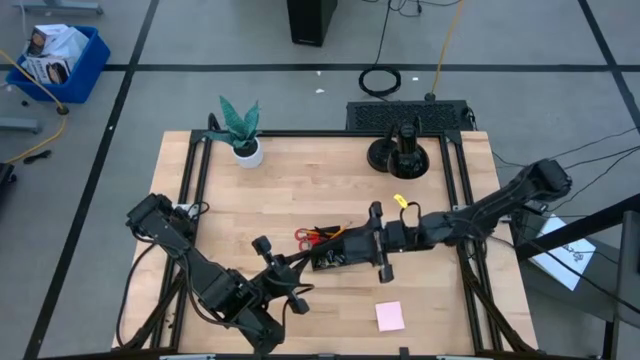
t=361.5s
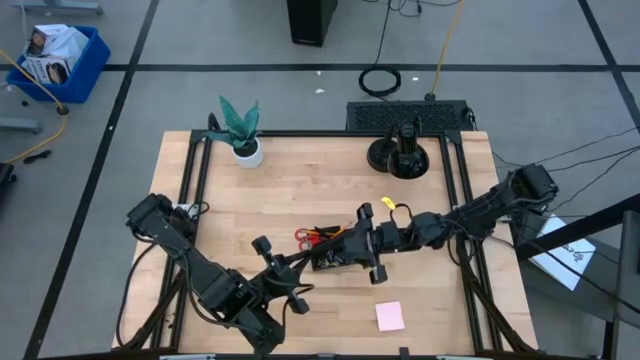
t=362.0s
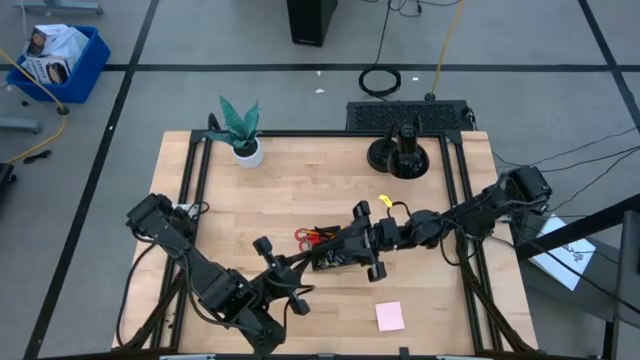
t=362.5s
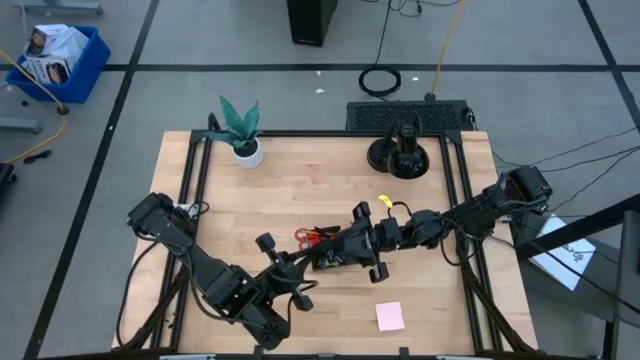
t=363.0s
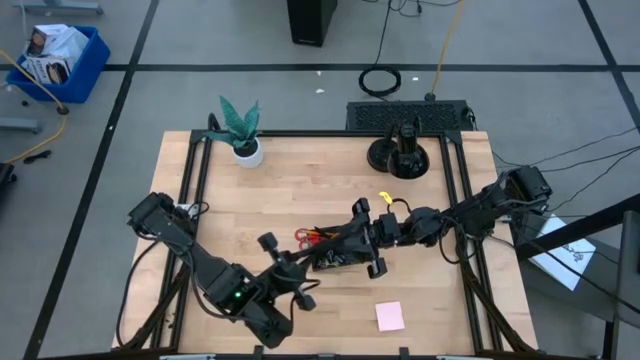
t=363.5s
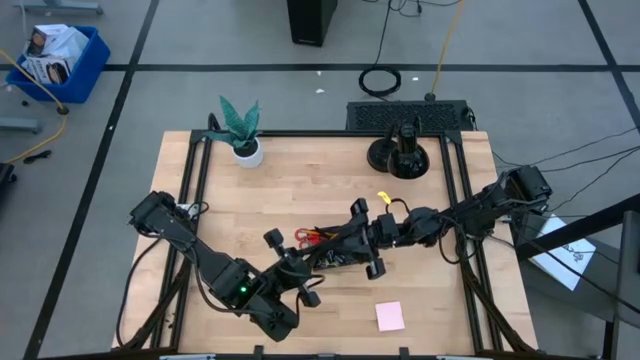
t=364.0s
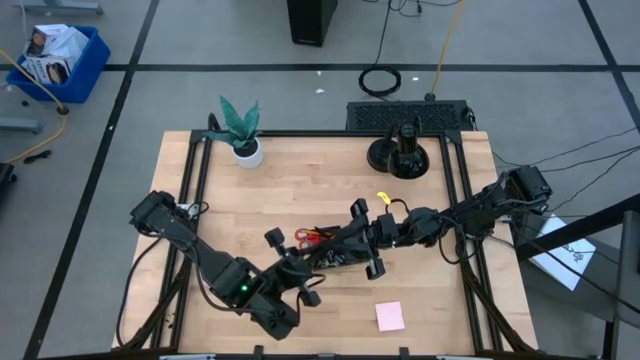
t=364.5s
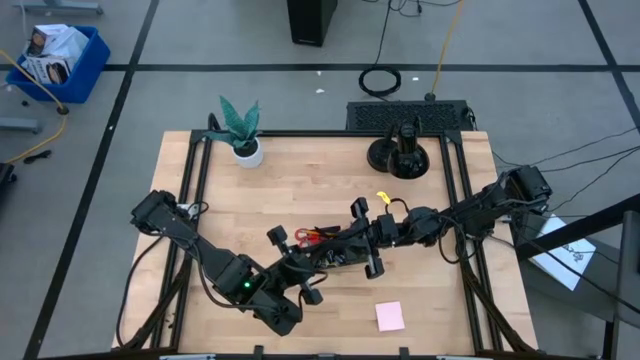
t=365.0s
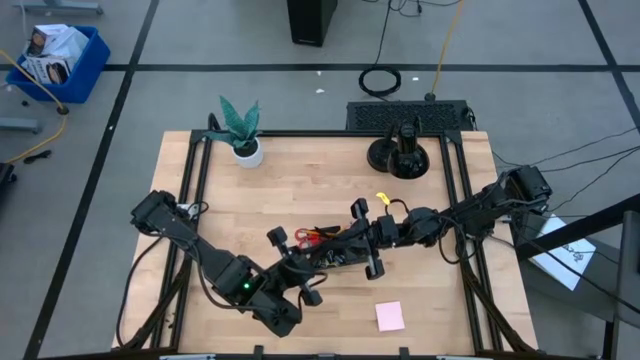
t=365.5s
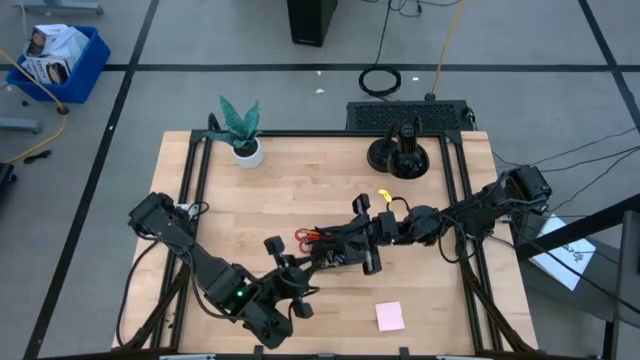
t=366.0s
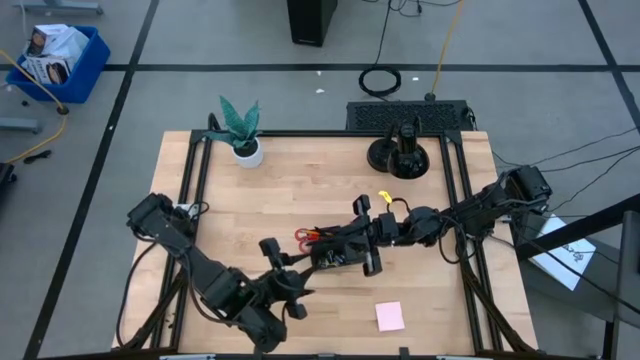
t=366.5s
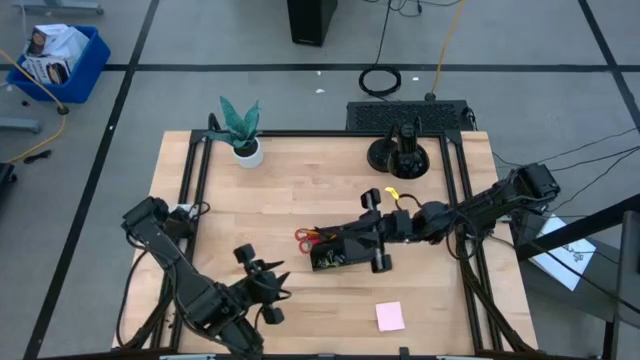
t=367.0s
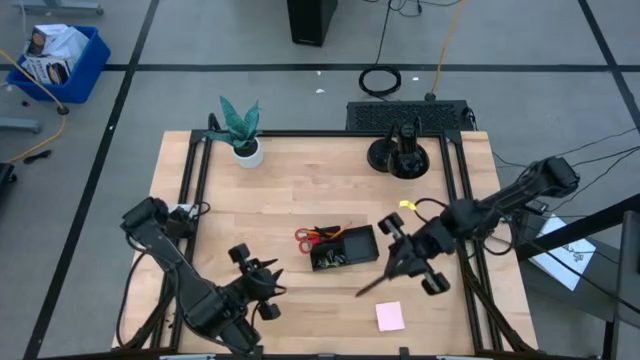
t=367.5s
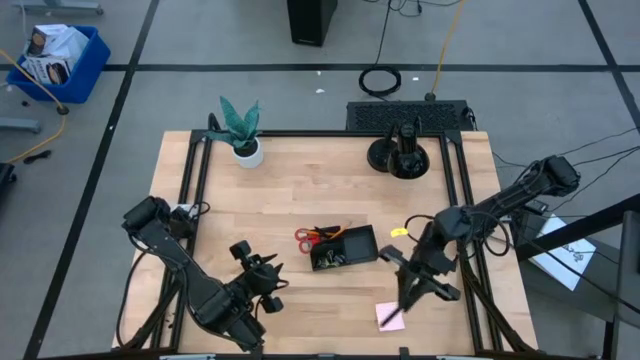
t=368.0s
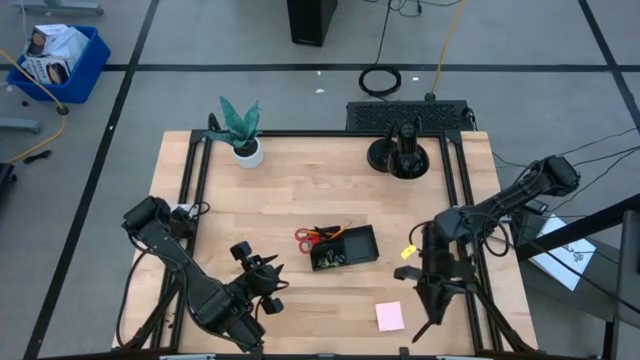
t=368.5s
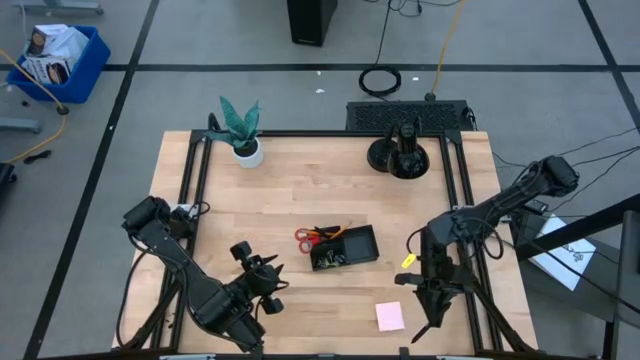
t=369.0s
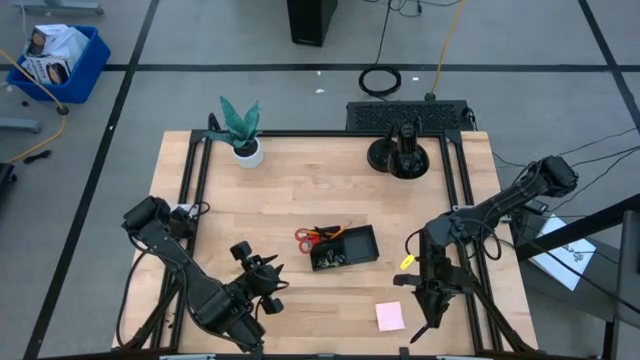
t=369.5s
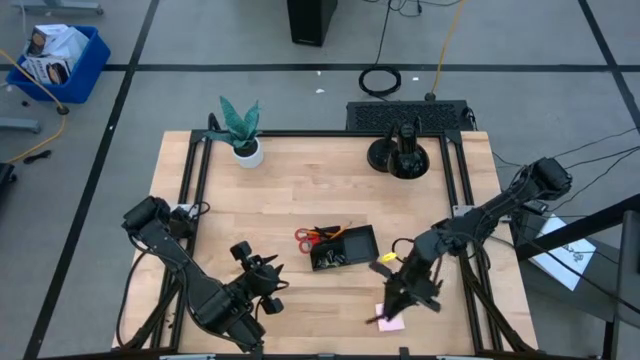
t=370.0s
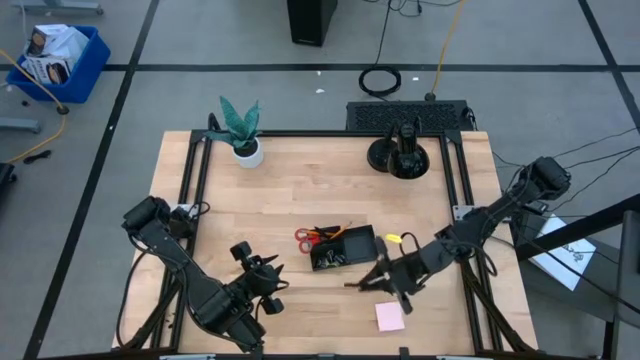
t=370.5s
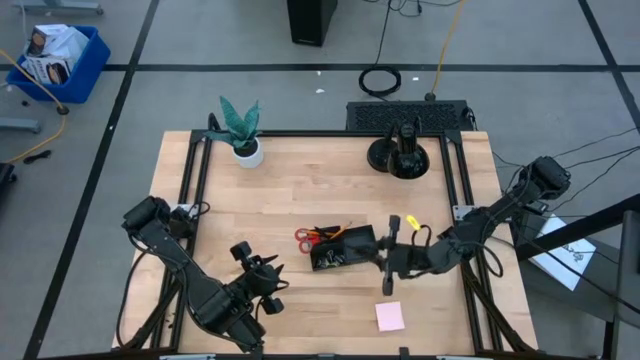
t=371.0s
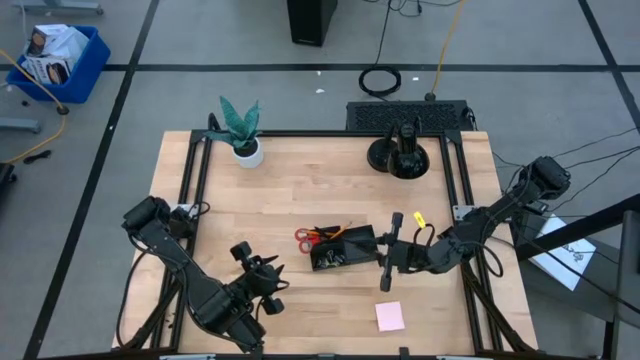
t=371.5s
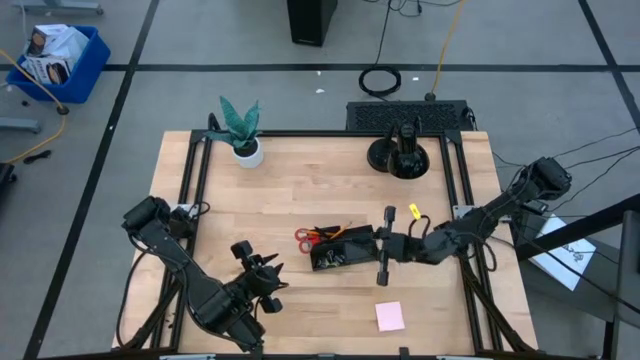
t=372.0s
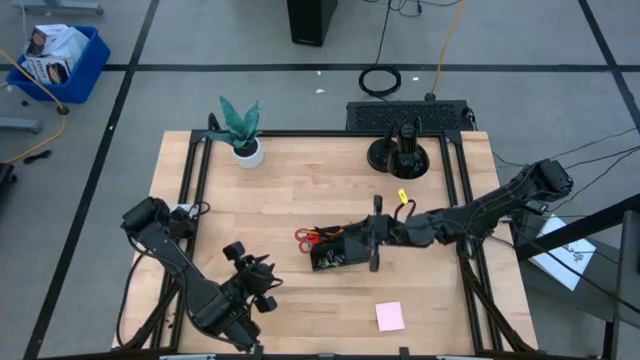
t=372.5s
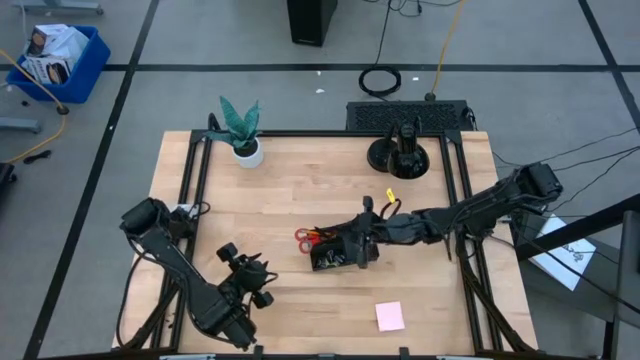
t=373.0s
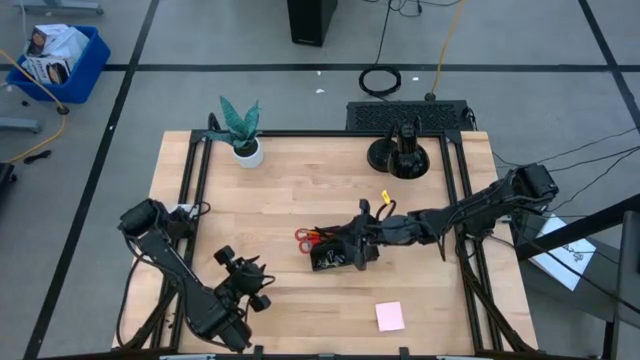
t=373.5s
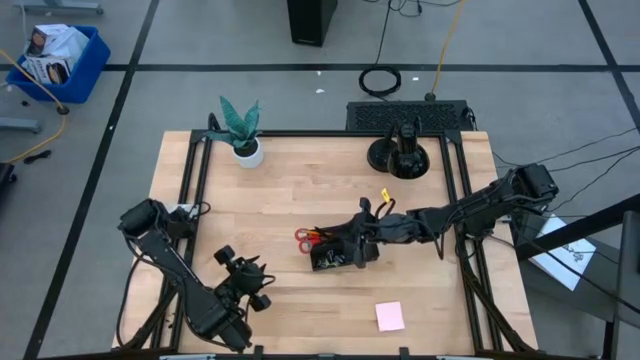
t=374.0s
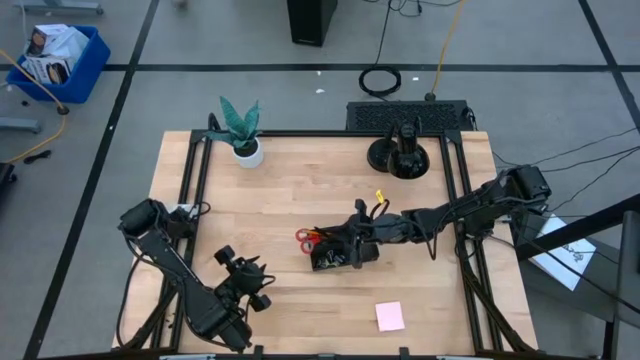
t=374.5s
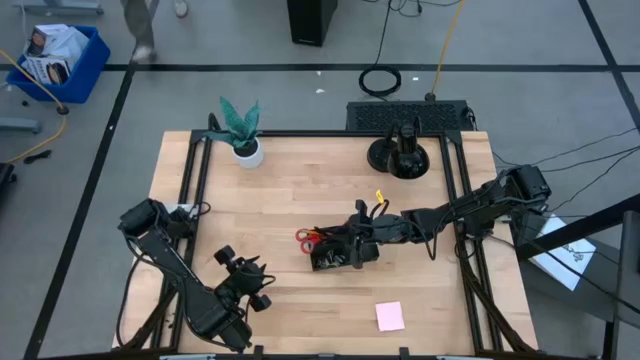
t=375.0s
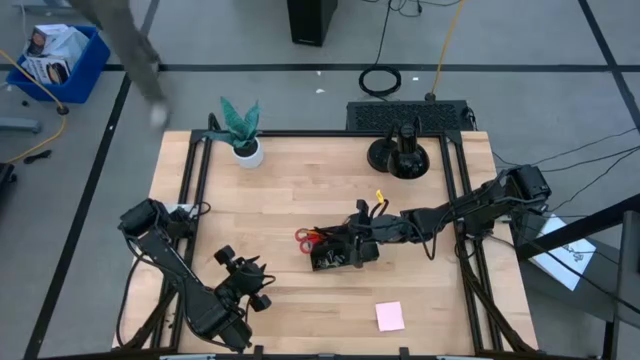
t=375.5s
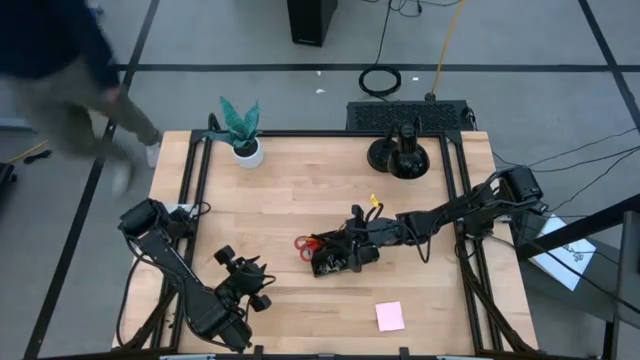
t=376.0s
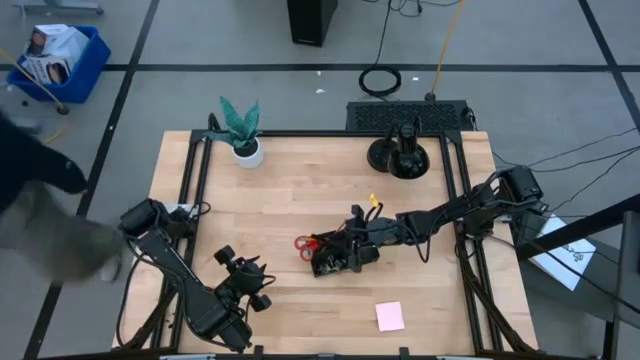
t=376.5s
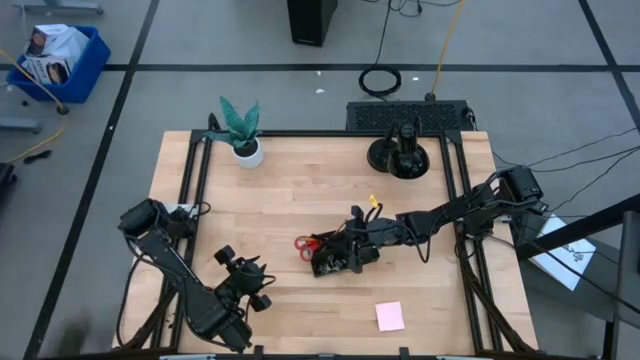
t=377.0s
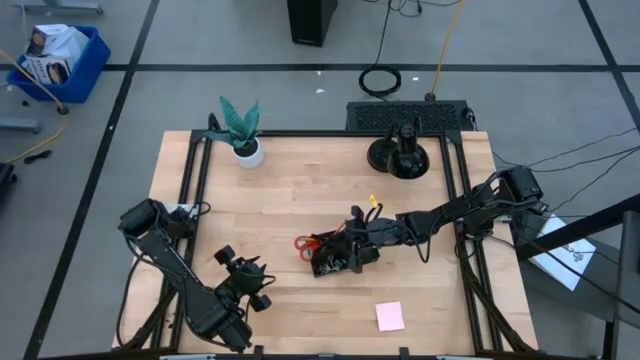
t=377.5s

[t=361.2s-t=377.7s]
Task: Pick and place office supplies into organizer
Put the black pen into the black desk organizer

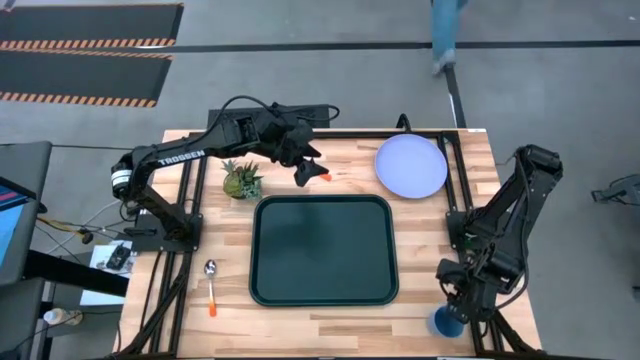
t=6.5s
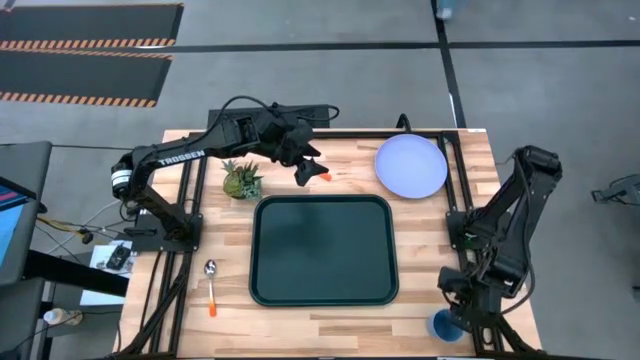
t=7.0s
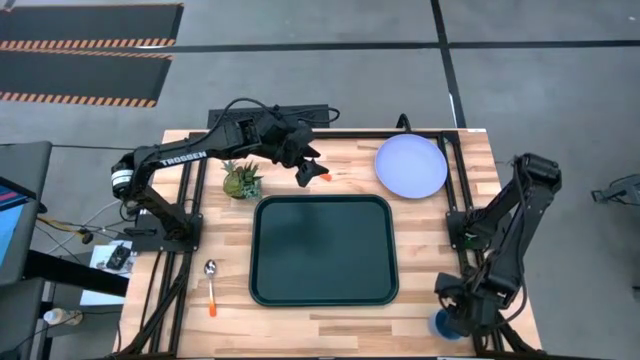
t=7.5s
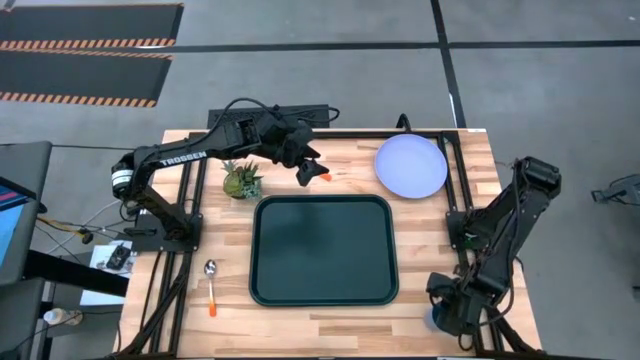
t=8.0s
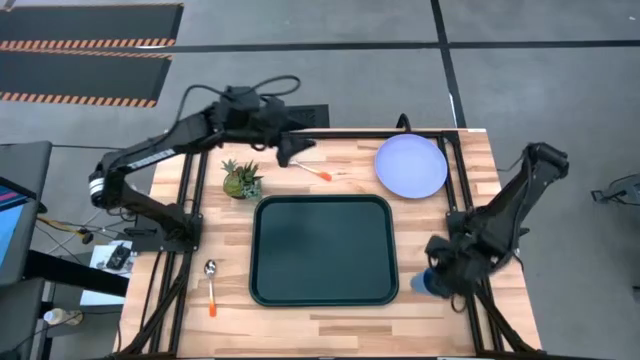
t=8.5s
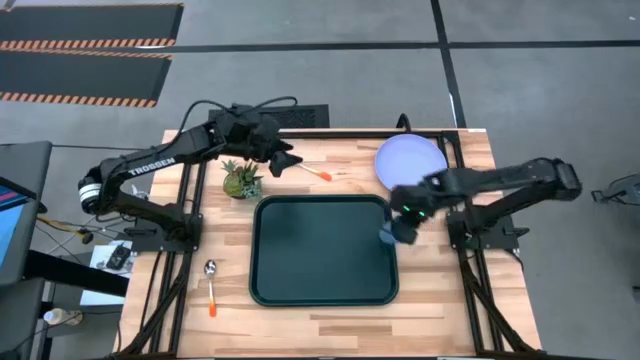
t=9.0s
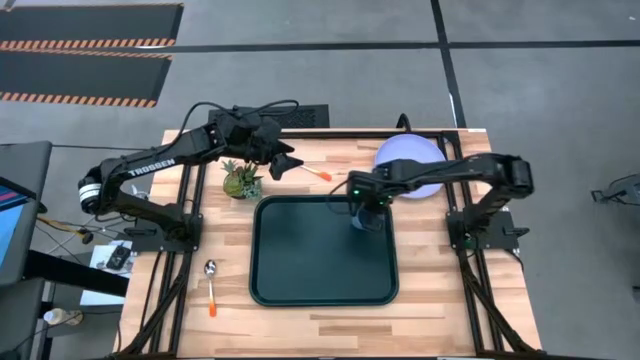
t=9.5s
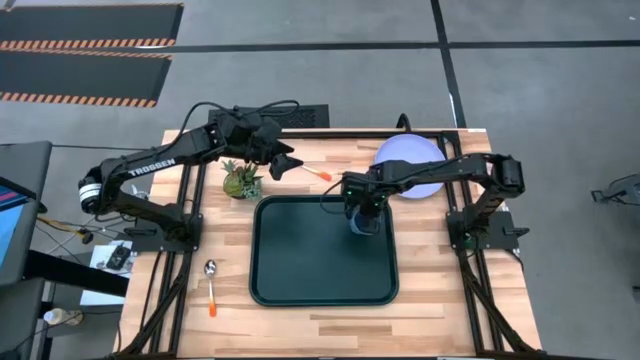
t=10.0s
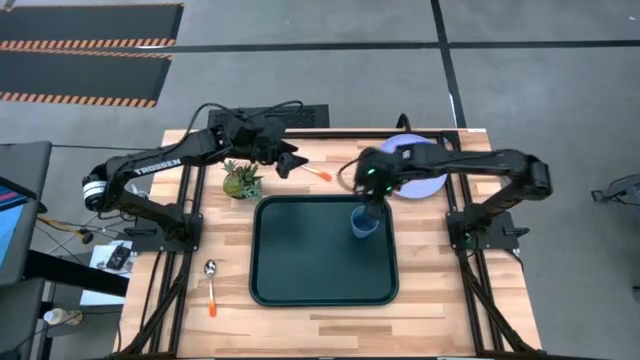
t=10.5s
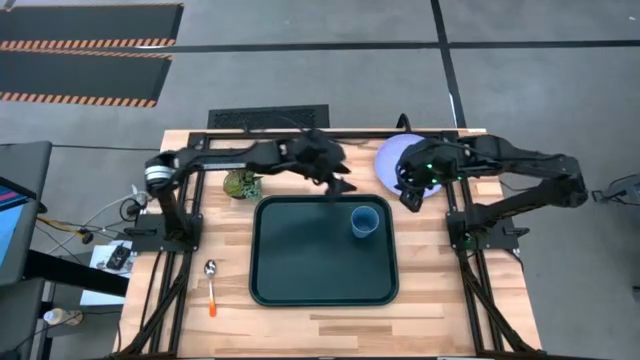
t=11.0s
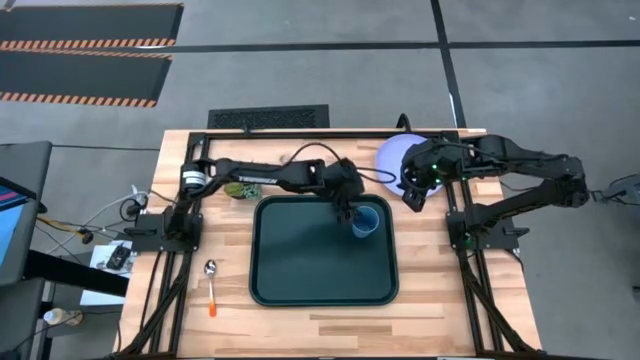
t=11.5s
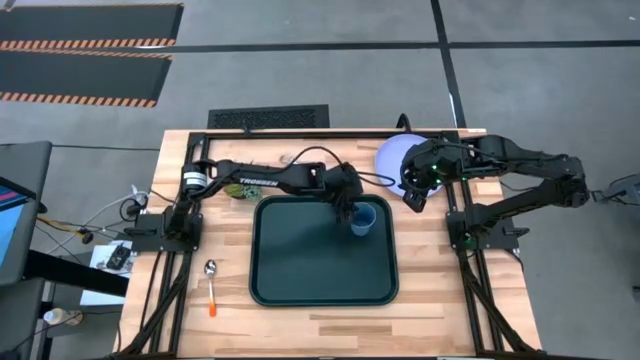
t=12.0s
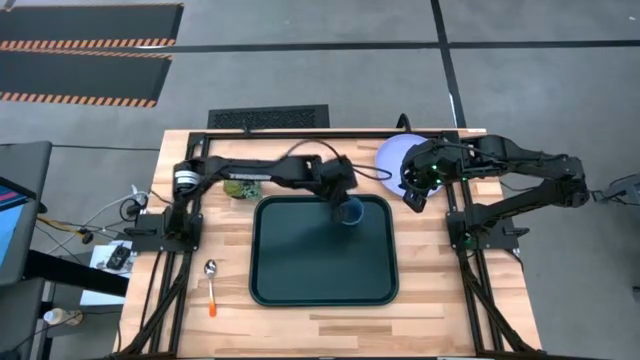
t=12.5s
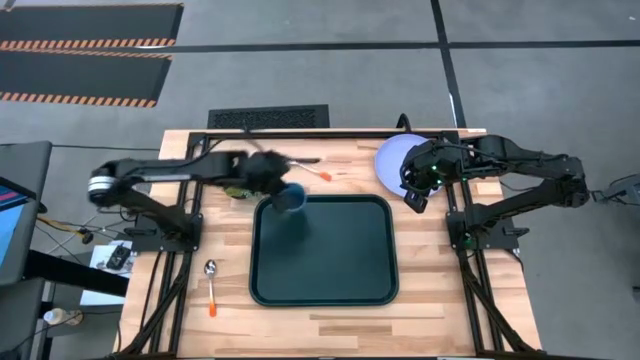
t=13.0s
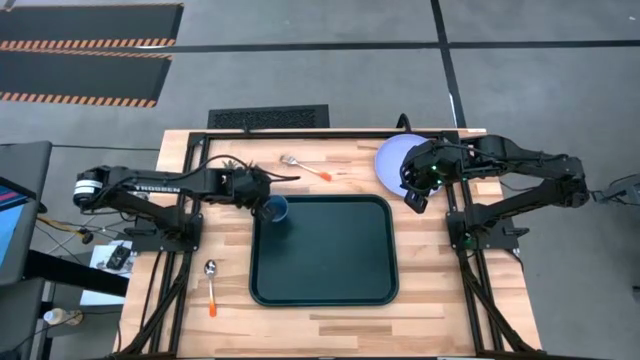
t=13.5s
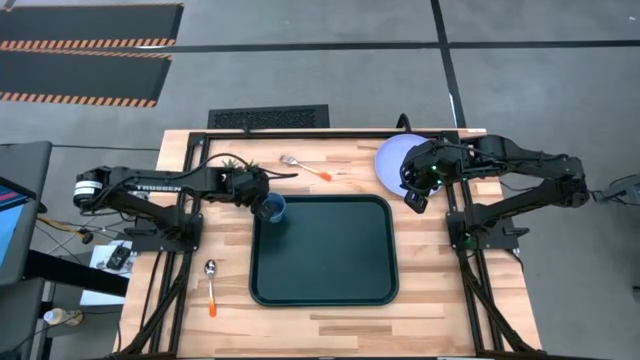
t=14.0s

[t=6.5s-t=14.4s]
Task: Pick and place plate/cup/fork/spoon on tray
Put the blue cup on the top left of the black tray
